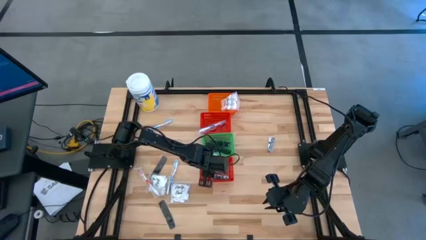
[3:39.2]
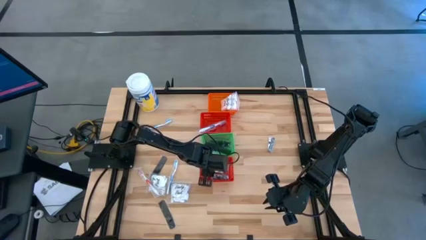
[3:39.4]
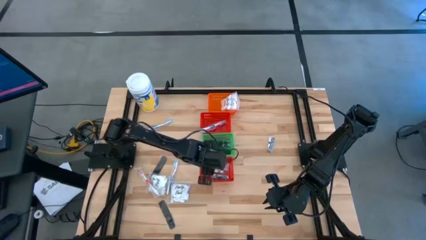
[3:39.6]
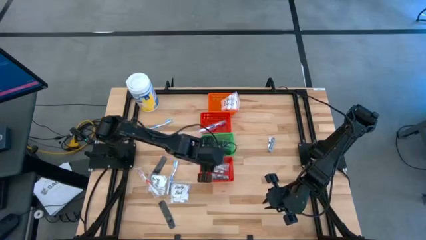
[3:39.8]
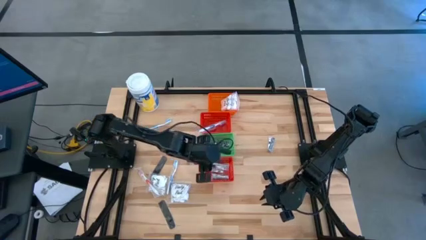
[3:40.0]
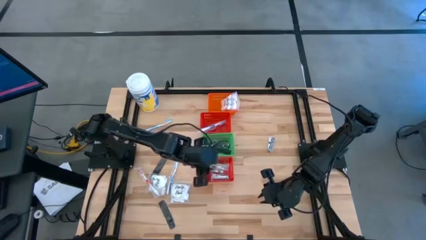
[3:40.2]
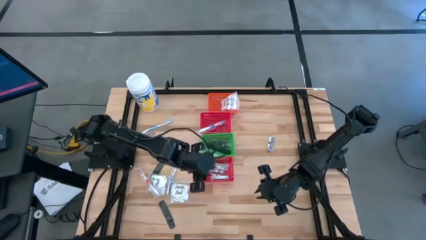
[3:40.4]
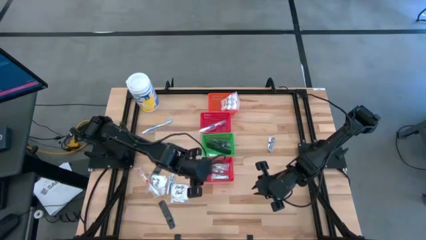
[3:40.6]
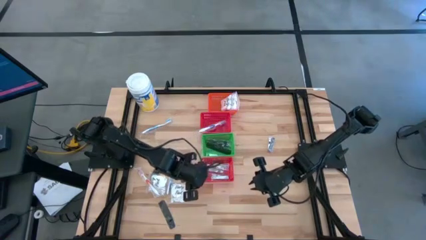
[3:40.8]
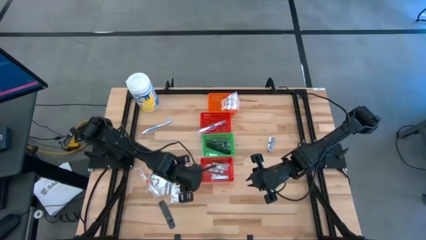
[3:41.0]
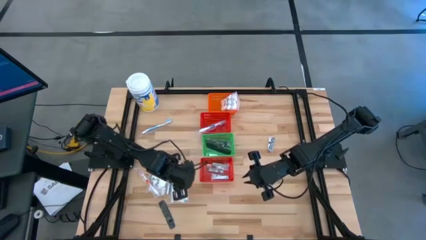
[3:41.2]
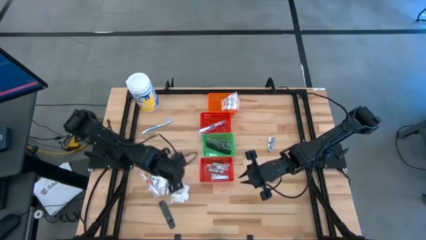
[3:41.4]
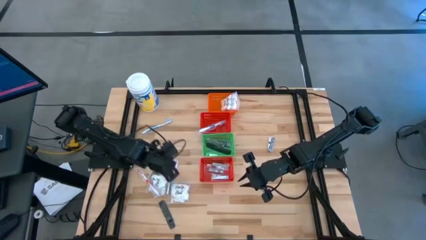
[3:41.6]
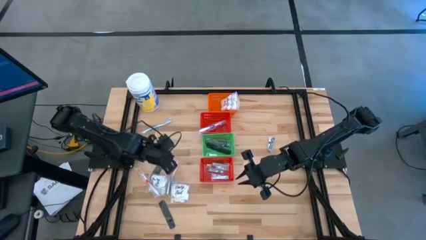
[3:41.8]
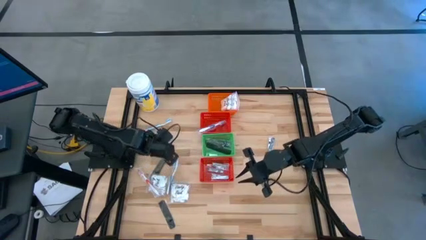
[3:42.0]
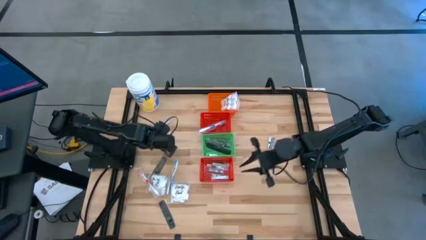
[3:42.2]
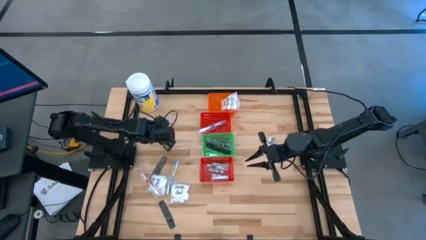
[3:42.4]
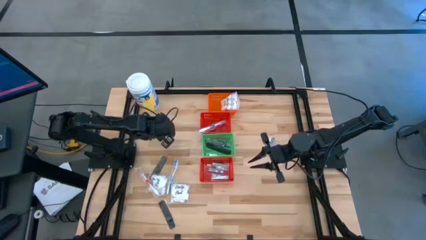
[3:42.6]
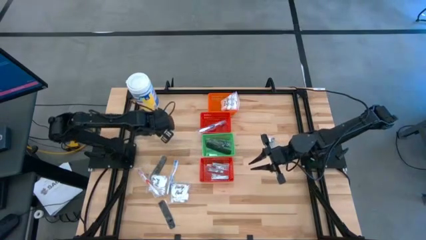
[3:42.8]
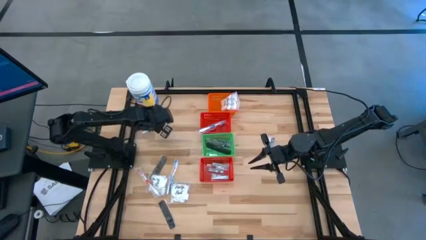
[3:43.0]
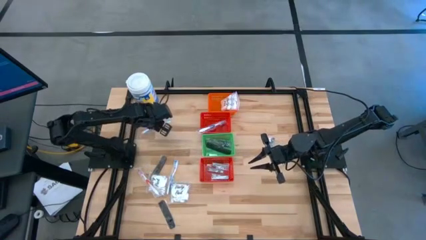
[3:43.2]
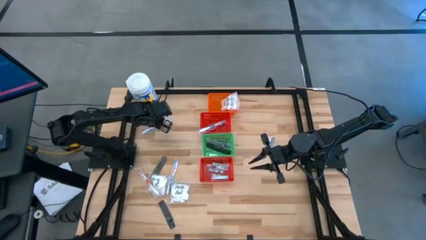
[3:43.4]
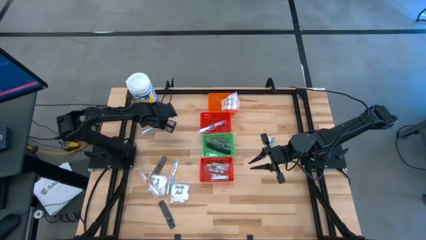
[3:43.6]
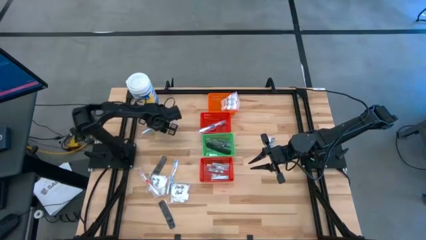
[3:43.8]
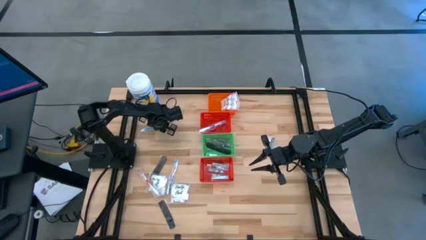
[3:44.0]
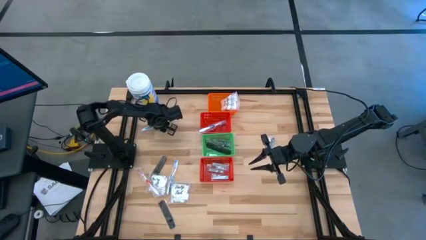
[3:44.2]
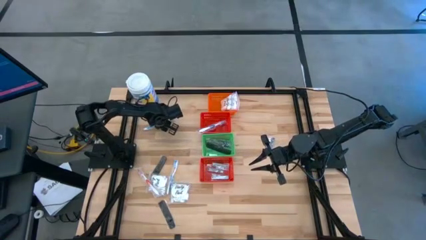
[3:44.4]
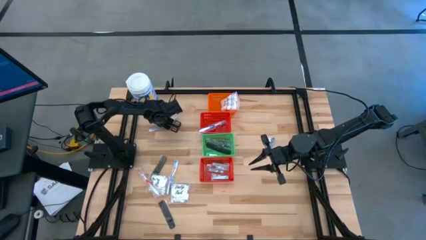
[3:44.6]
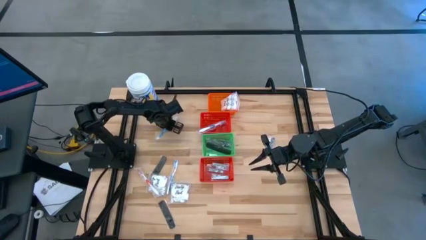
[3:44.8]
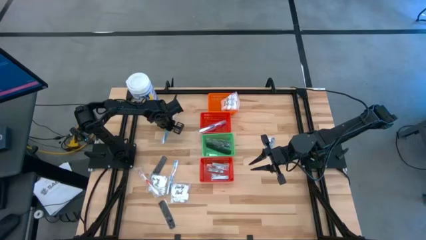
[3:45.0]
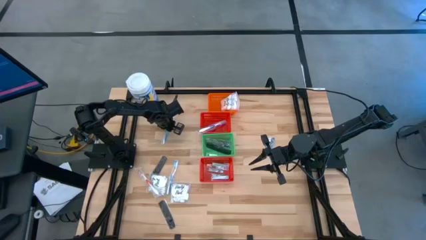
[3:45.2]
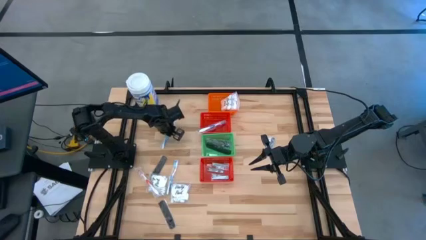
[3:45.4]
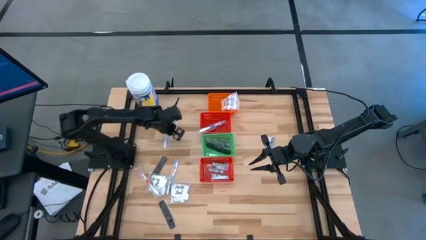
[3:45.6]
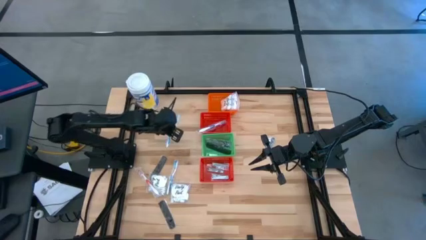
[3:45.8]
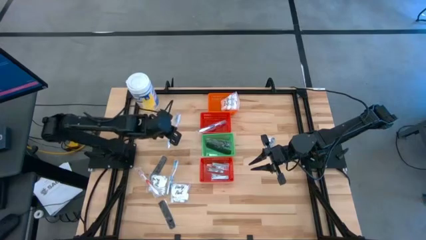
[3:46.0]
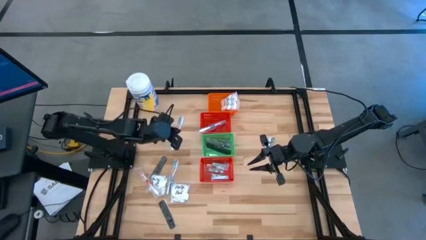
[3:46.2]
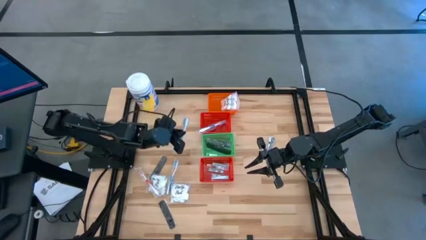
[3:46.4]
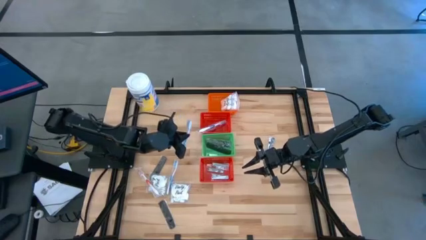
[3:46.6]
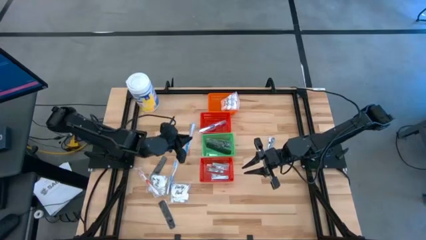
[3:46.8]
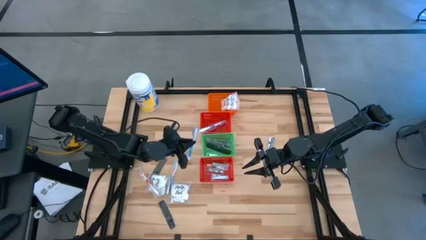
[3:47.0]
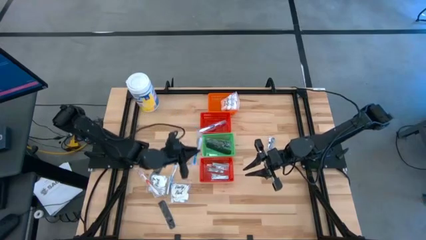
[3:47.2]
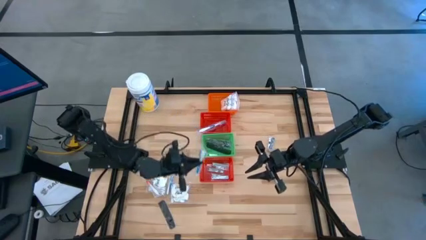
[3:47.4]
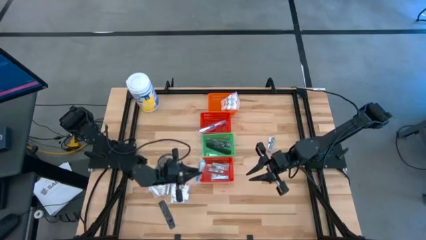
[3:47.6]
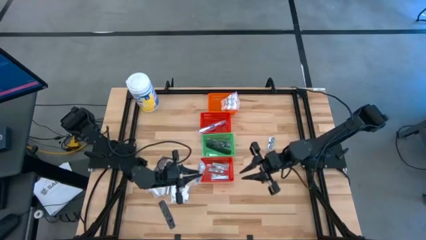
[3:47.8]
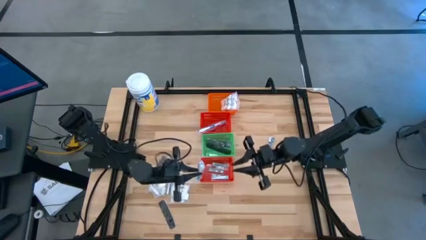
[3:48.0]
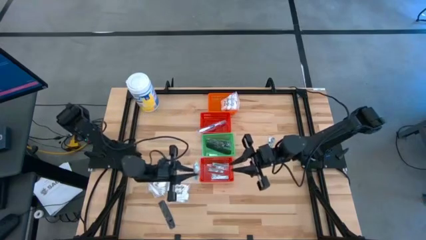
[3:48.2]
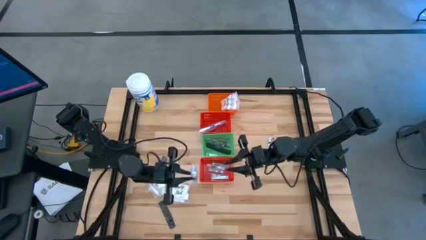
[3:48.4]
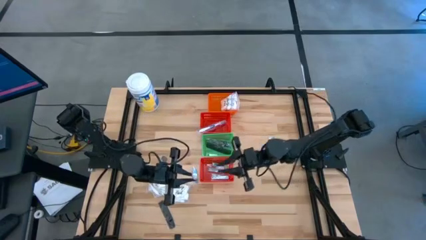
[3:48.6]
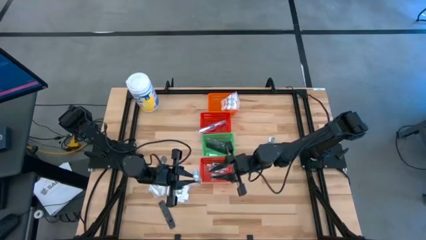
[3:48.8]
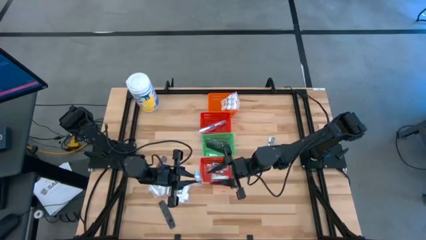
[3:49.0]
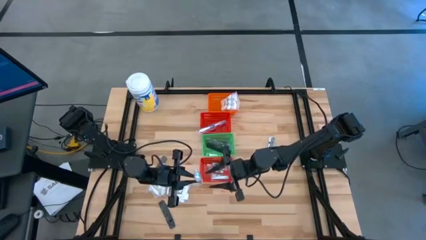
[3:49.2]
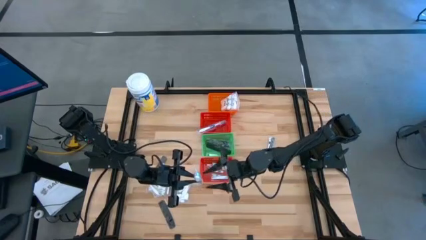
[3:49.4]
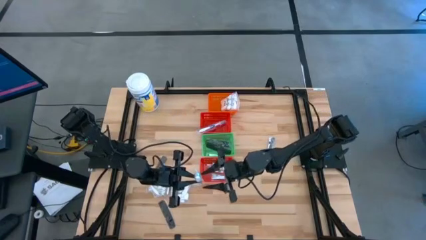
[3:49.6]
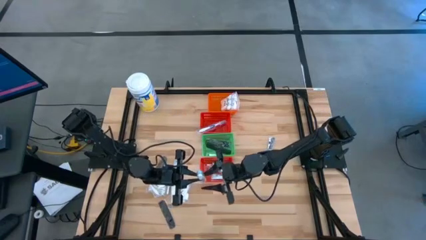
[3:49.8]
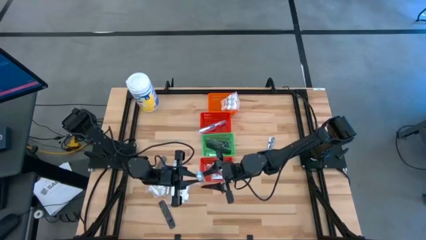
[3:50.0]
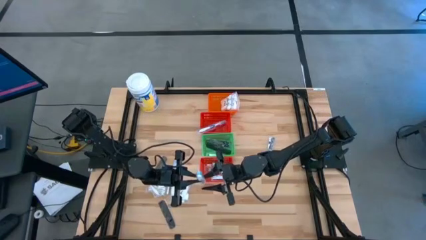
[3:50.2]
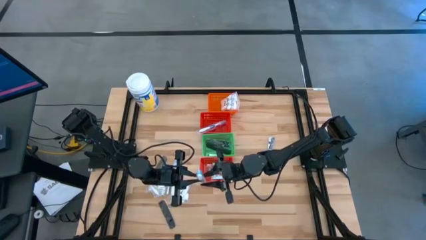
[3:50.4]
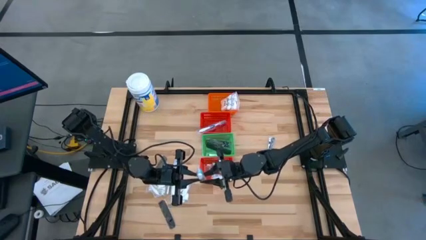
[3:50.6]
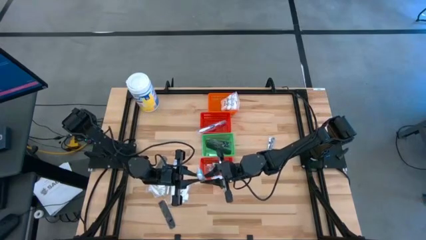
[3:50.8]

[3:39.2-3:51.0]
Task: Pick & Place Travel size toiletries
Put the blue toothbrush into the top red basket

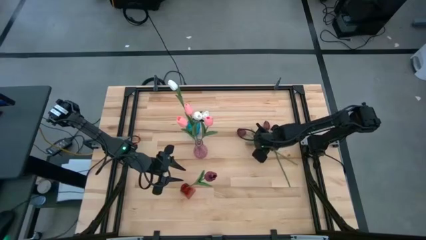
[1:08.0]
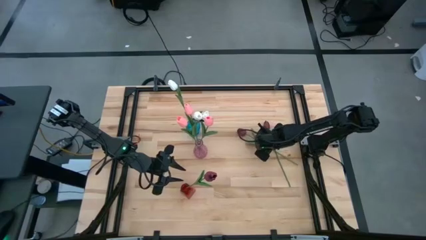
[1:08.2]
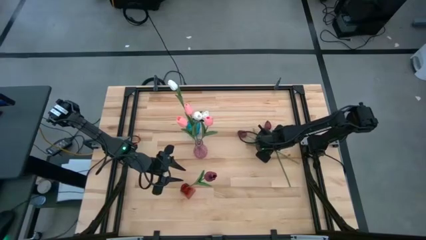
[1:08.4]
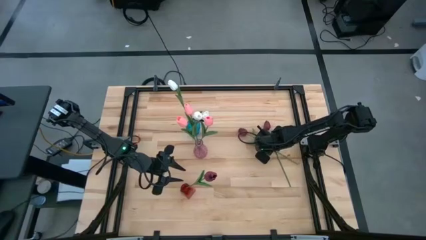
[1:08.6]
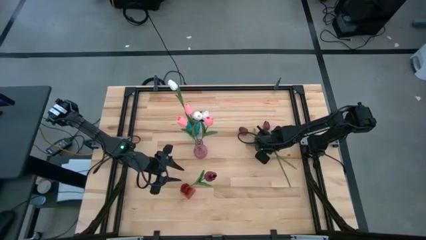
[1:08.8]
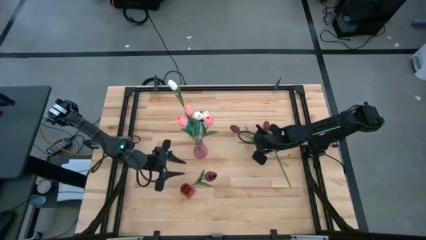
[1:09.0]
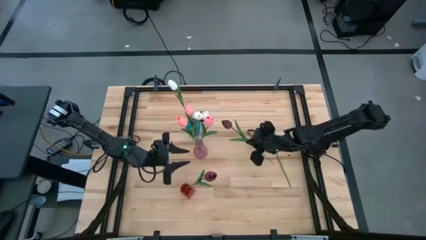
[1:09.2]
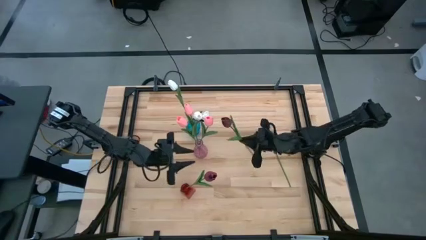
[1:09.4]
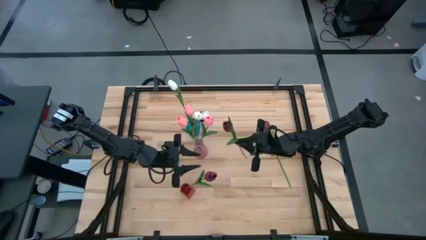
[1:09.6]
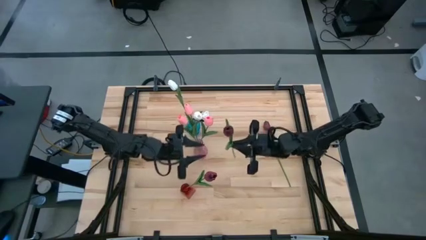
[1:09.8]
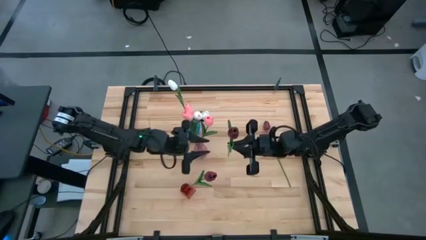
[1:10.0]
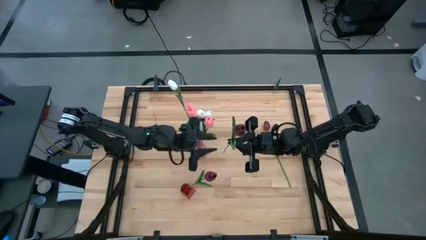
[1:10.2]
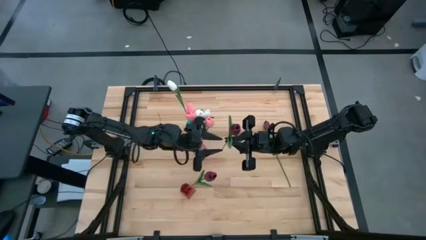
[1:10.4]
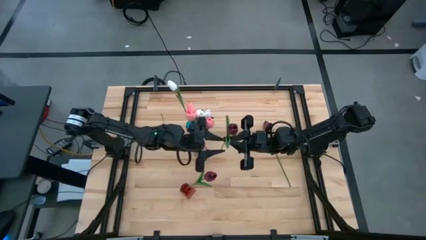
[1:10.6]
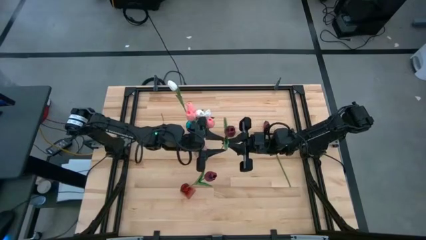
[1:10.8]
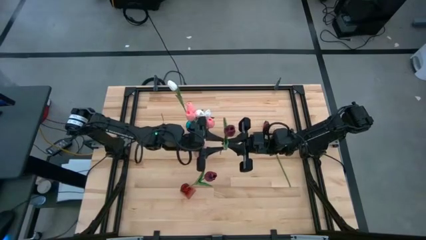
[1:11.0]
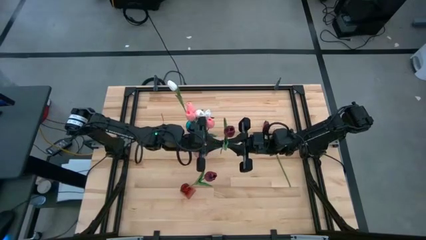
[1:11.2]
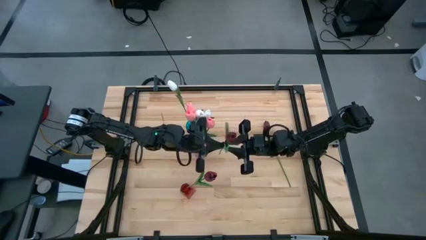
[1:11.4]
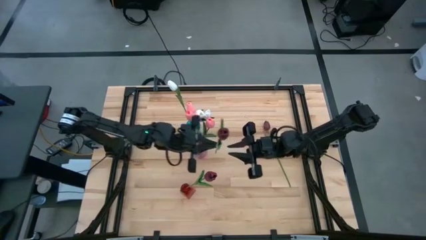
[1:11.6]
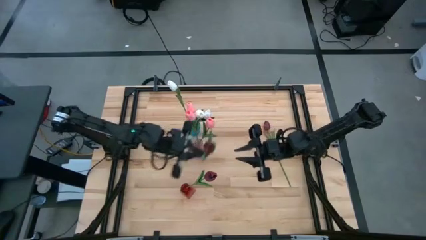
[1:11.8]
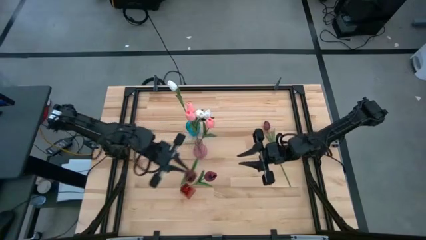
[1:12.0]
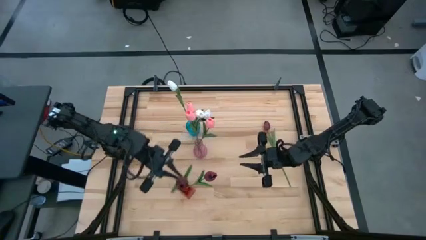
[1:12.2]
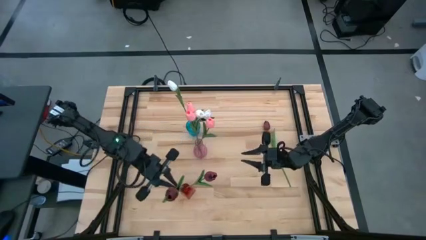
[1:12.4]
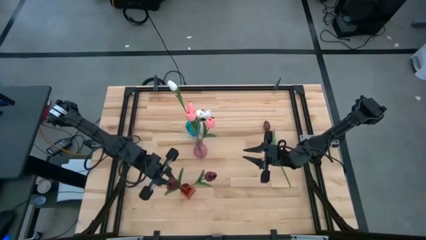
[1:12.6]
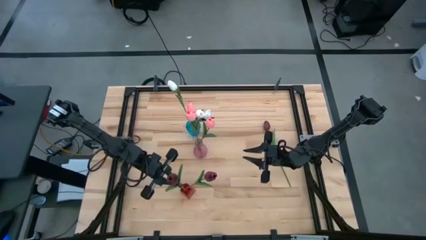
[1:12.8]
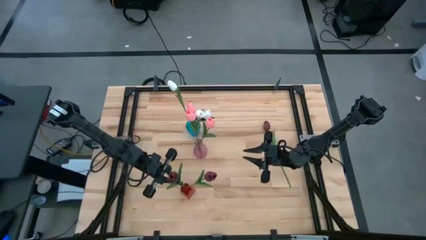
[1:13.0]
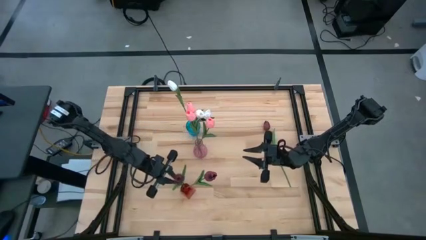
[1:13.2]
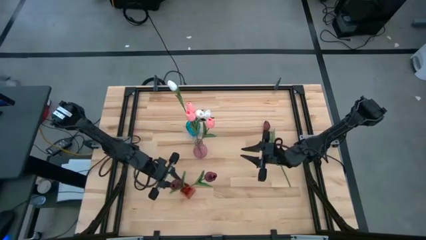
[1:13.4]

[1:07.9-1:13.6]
Task: Sort flowers into vase by color
Put the left red tulip into the red vase
